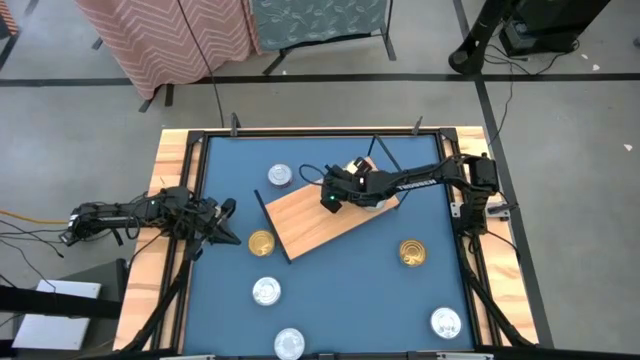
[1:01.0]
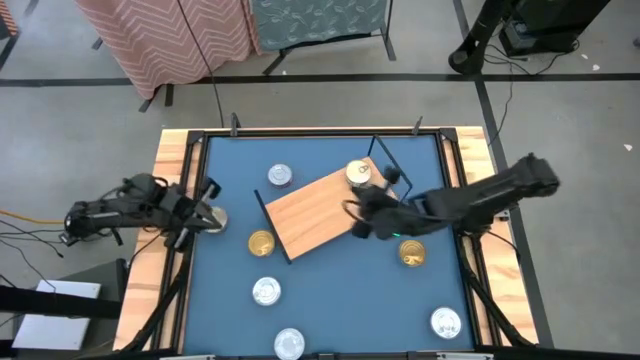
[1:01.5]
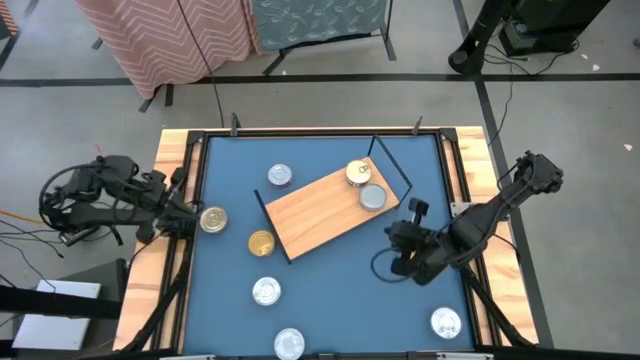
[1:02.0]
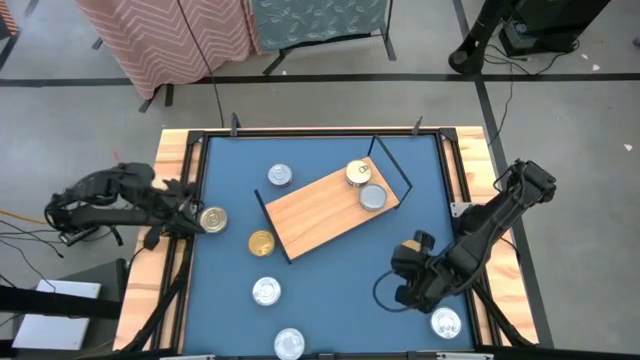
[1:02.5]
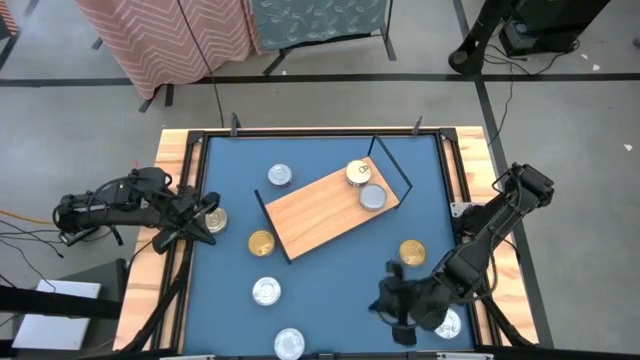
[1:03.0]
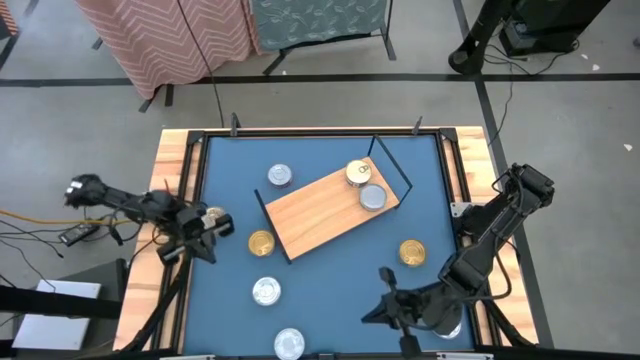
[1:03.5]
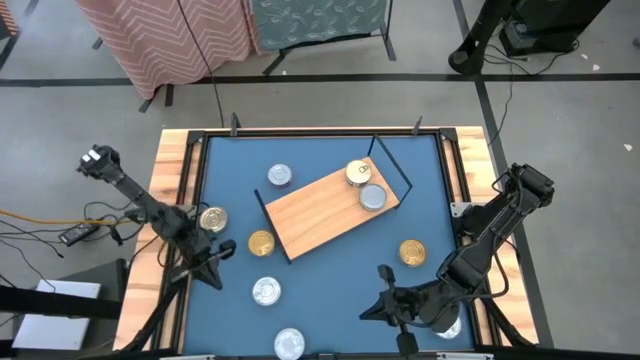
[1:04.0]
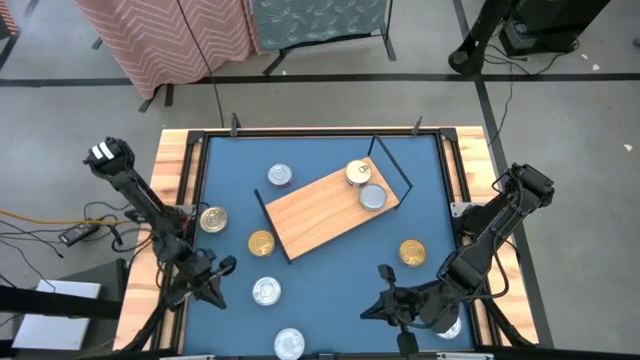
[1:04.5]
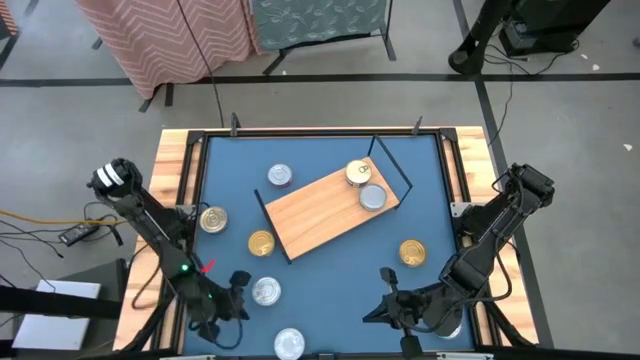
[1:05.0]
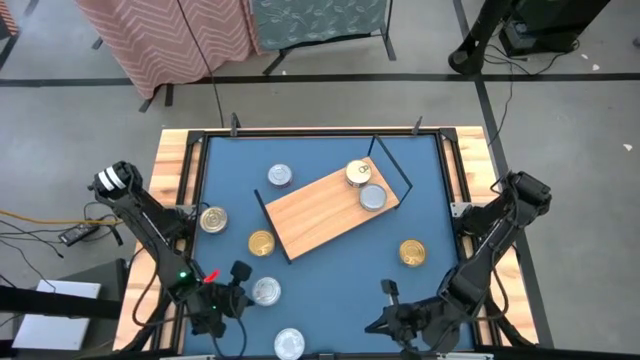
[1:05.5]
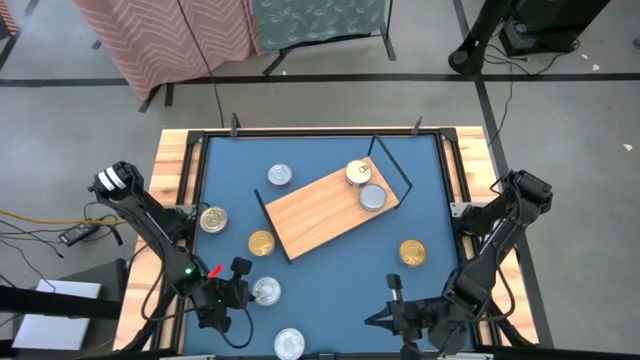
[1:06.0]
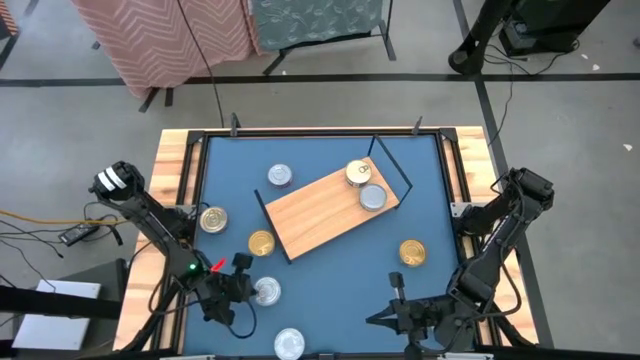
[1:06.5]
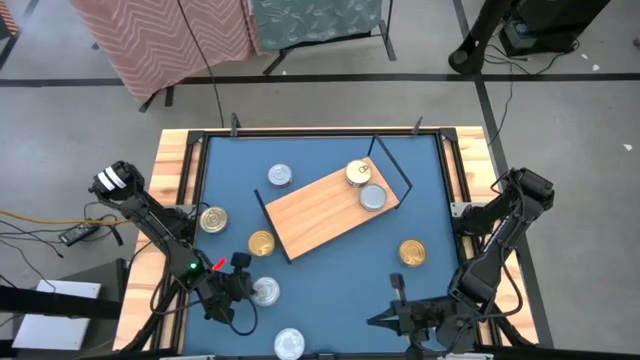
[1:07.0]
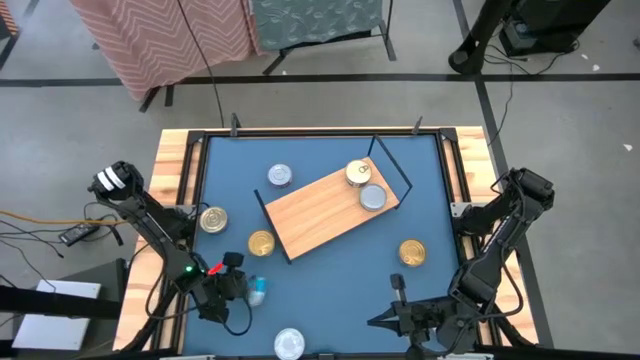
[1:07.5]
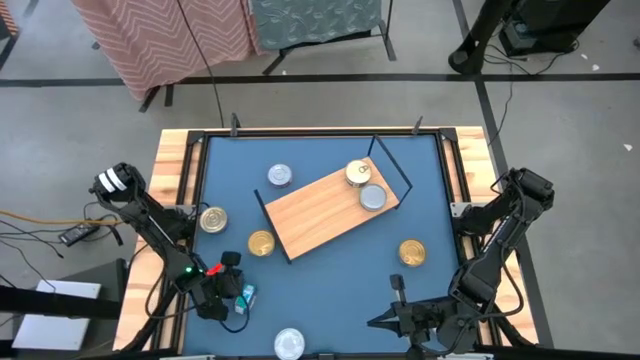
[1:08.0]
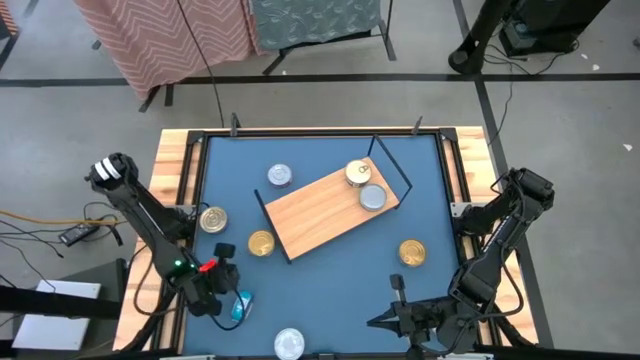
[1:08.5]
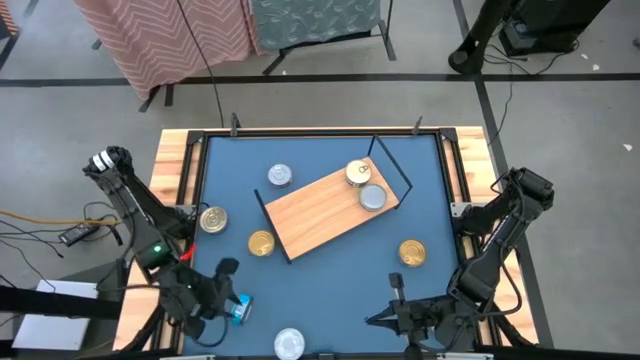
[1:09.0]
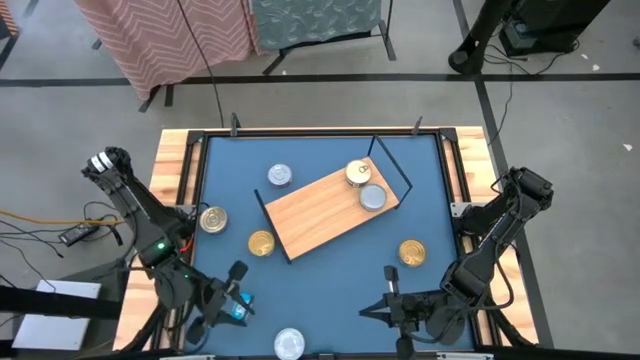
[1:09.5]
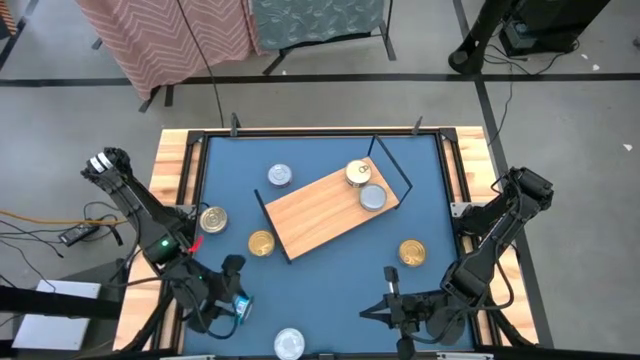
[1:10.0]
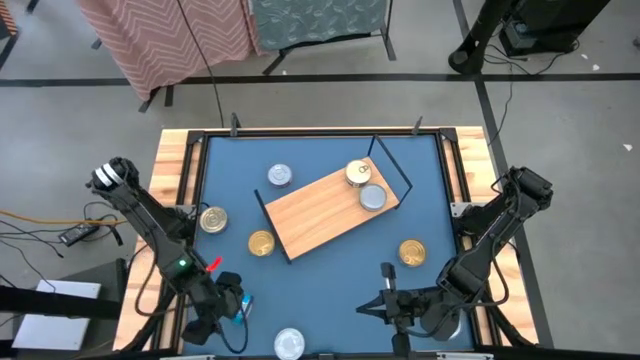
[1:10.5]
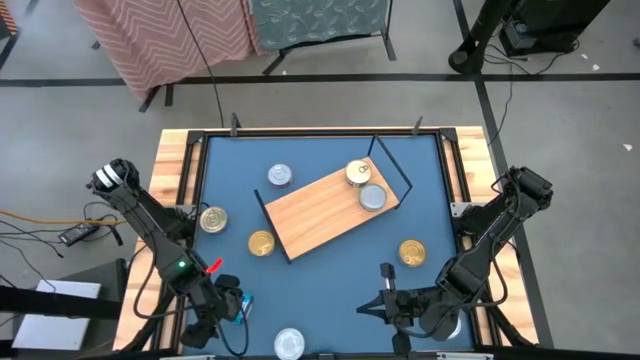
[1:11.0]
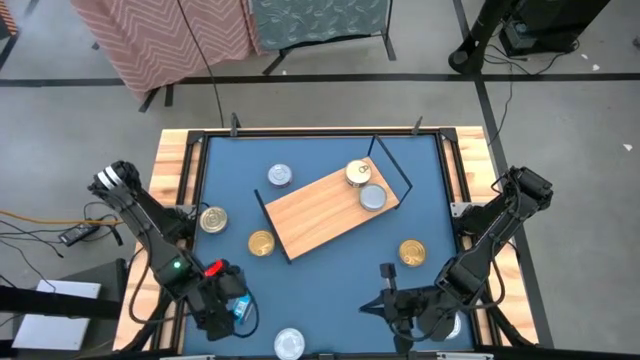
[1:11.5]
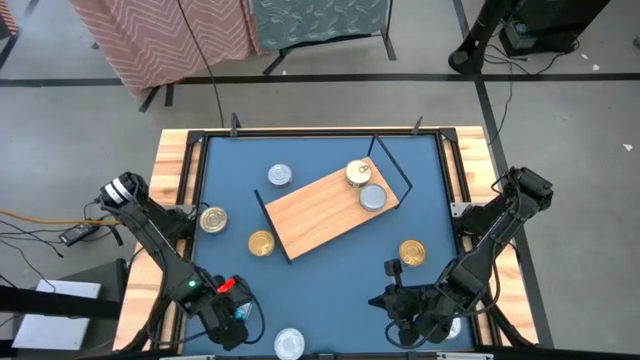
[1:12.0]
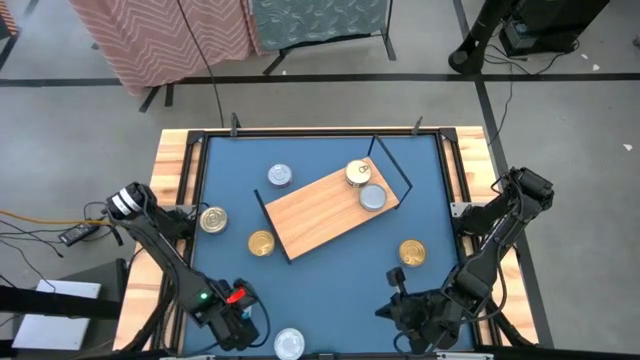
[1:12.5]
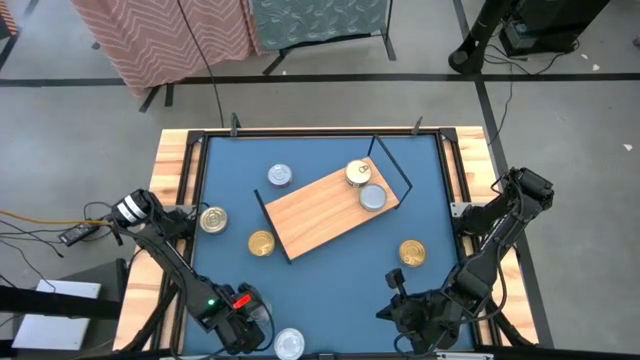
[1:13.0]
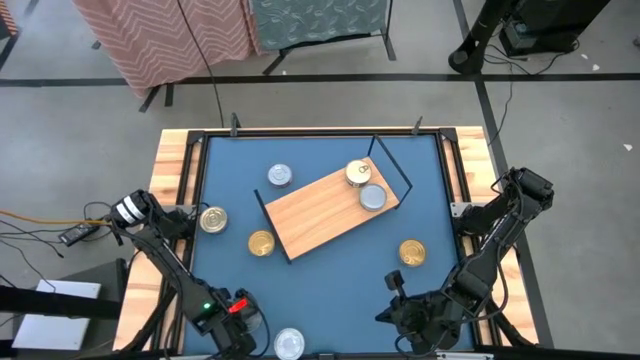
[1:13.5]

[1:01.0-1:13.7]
Task: Stack canned seafood by type on shelf
Put the green/blue tuna can on the shelf

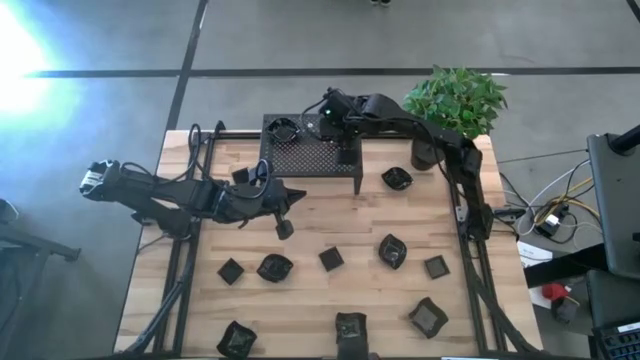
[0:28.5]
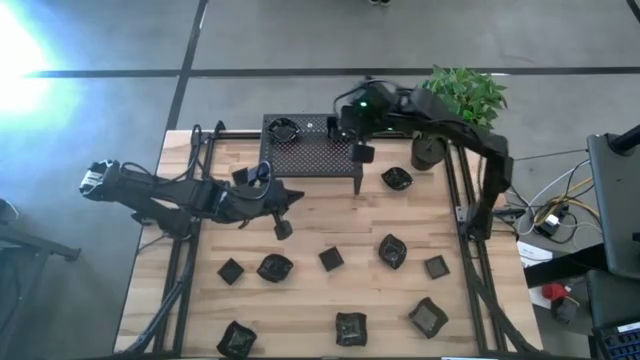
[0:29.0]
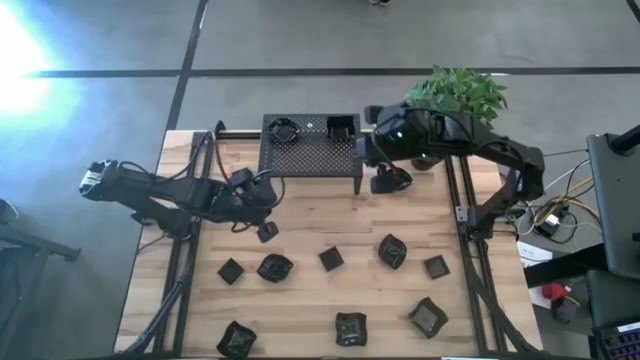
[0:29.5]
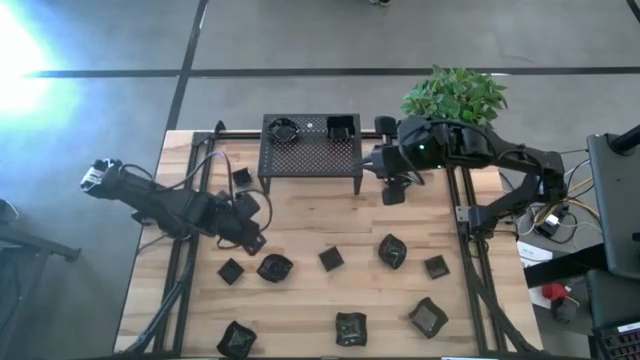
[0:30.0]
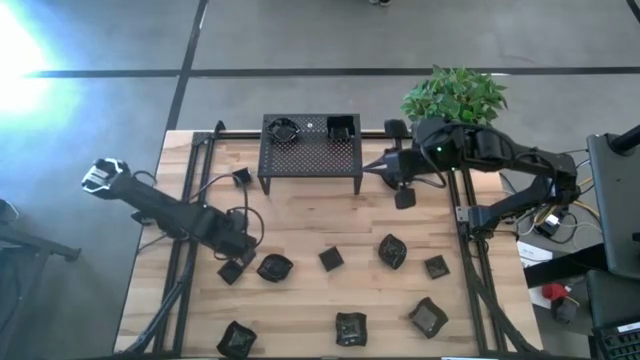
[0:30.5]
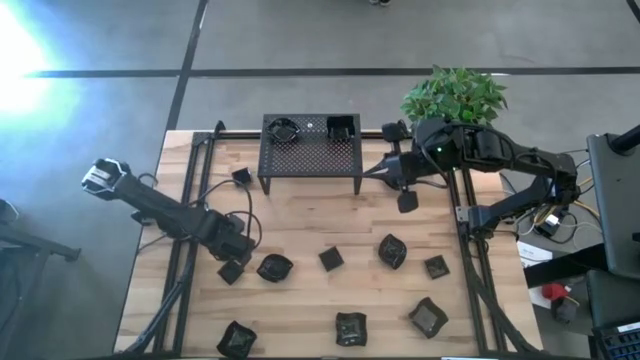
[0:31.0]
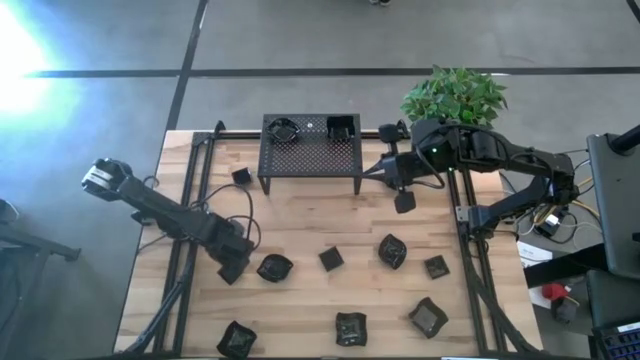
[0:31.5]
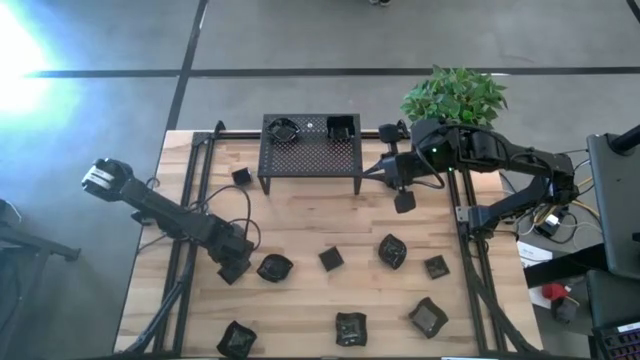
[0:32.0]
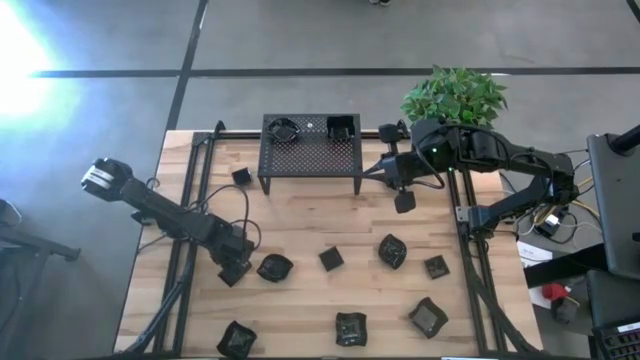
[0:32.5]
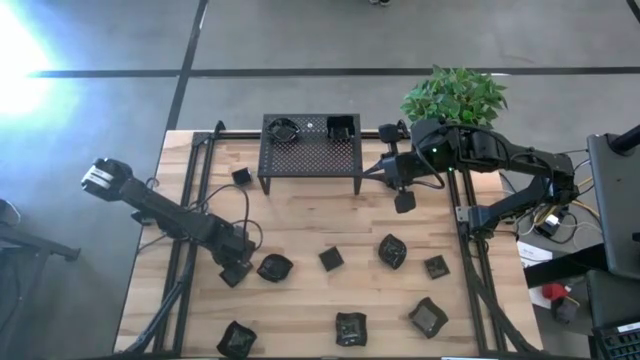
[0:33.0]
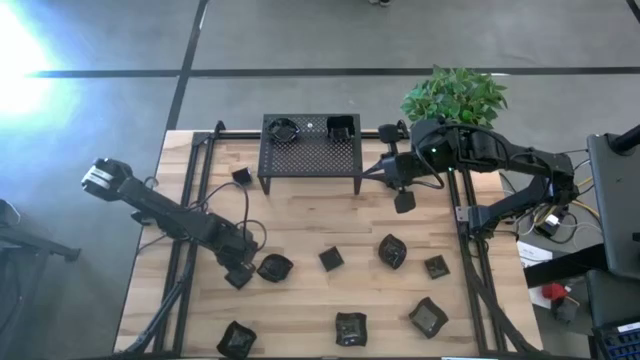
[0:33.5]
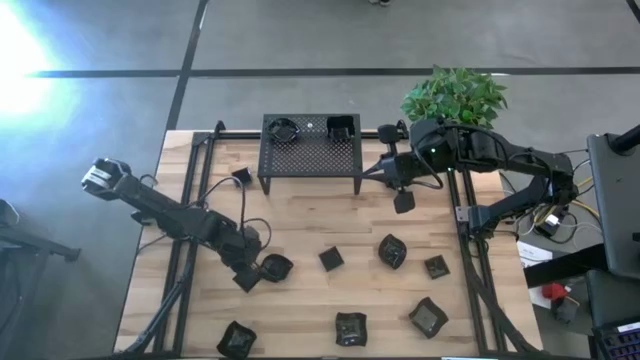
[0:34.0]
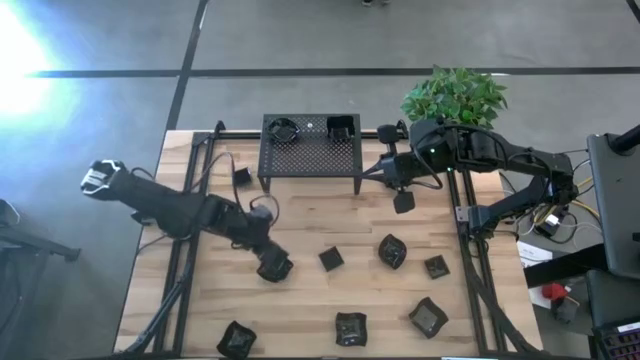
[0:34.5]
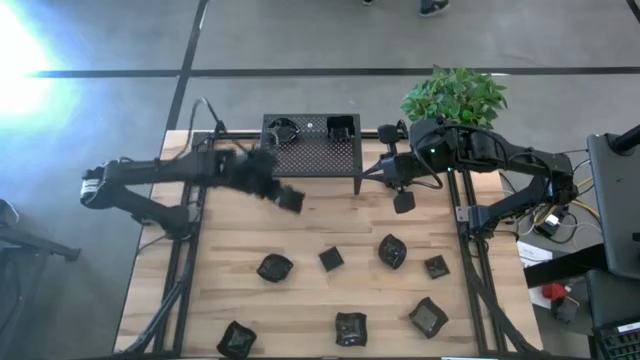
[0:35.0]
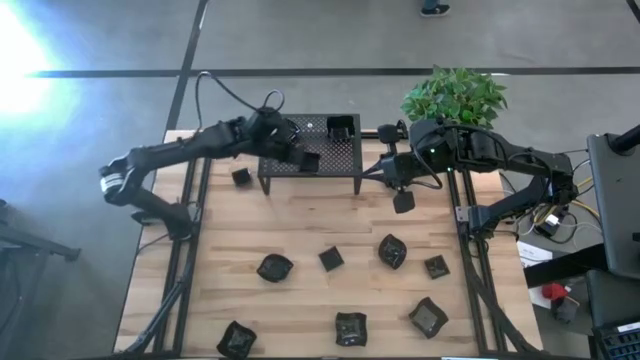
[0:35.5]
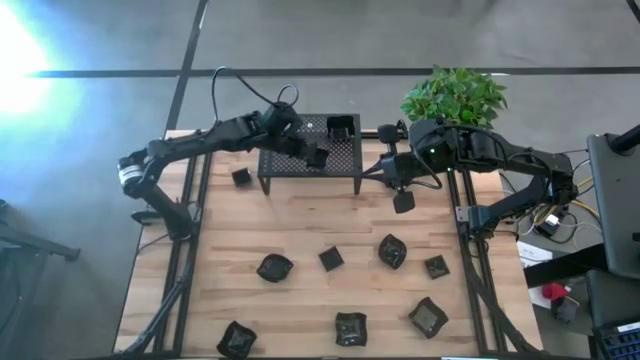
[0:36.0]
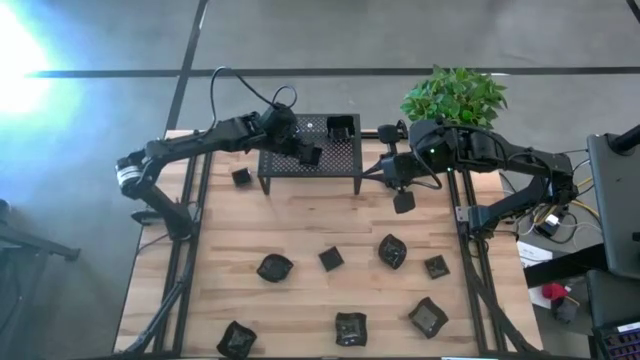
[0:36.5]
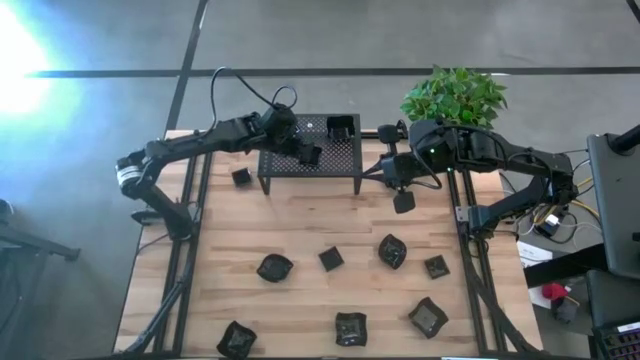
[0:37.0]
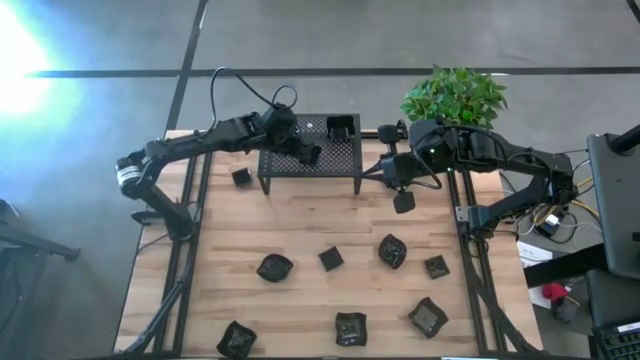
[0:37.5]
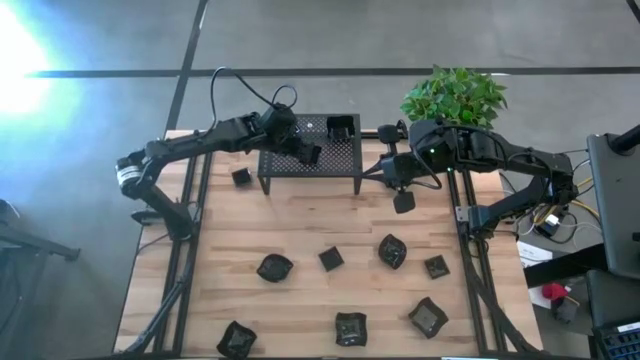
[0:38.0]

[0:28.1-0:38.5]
Task: Pick & Place Mini shaped plates
Put the square plate on the shelf
